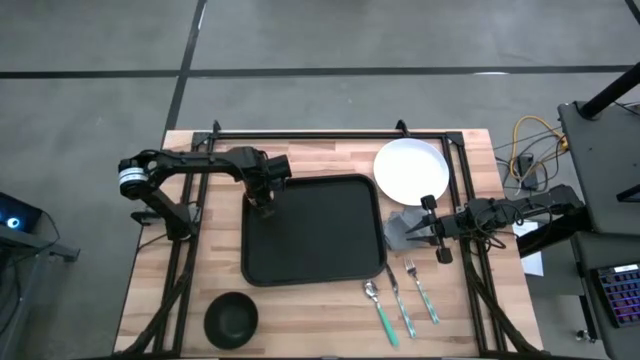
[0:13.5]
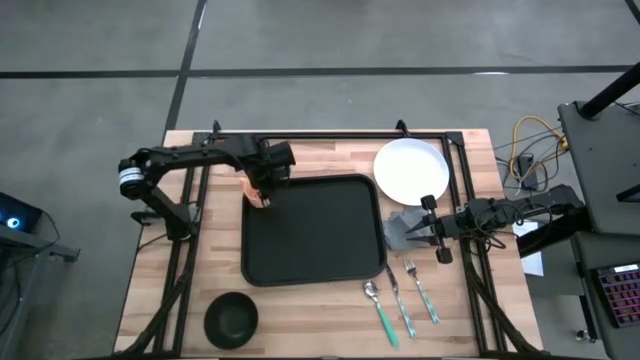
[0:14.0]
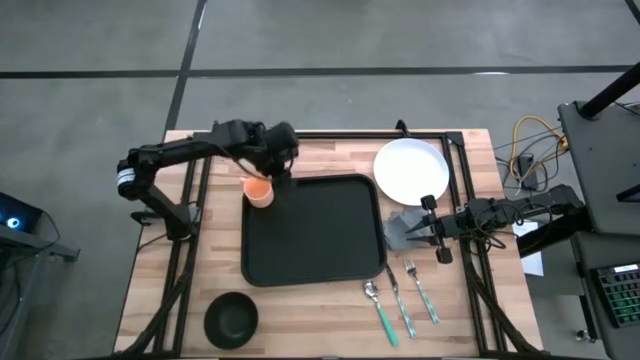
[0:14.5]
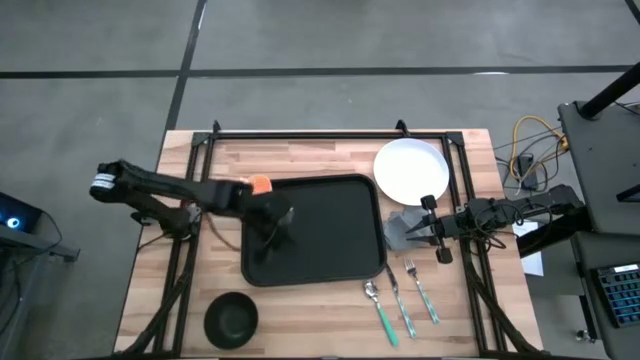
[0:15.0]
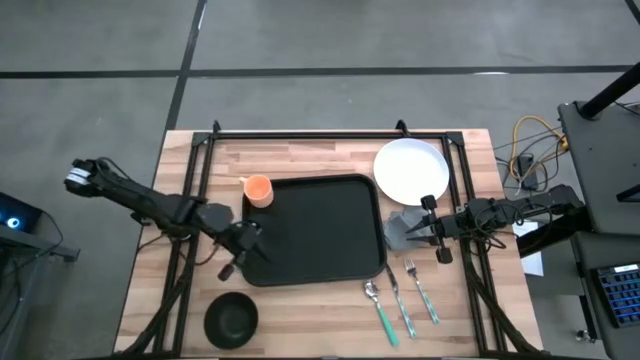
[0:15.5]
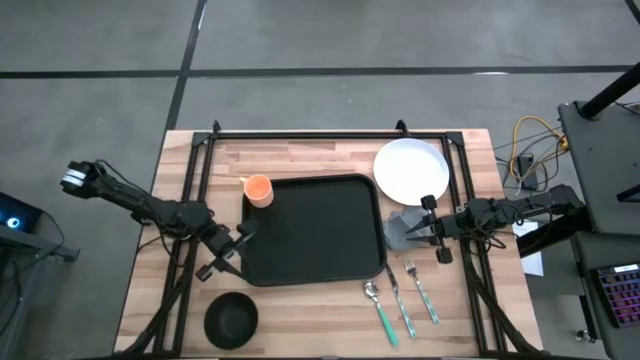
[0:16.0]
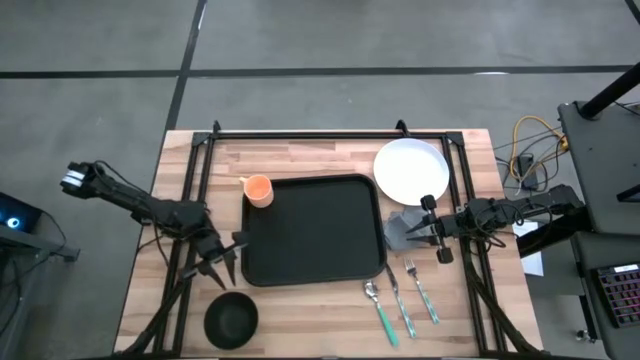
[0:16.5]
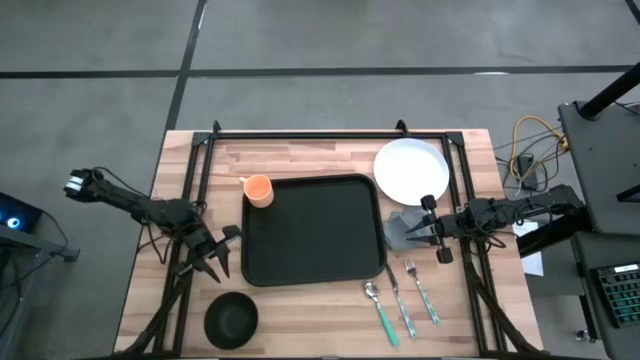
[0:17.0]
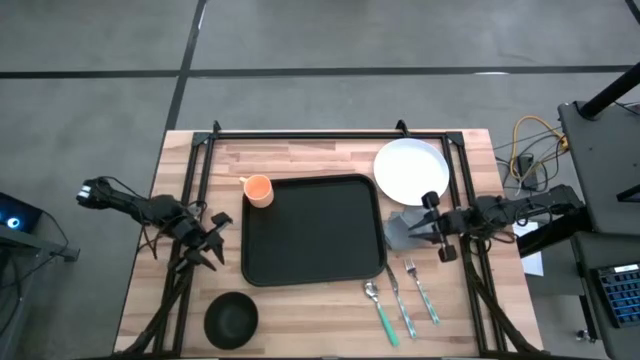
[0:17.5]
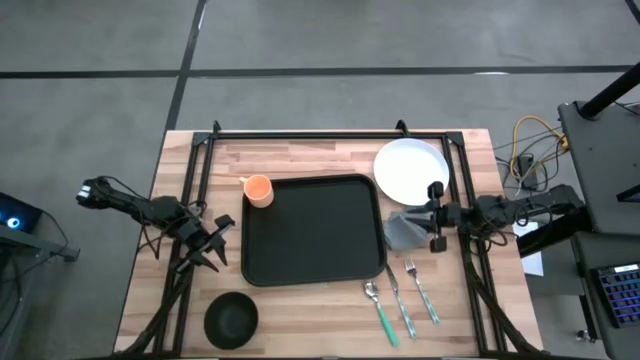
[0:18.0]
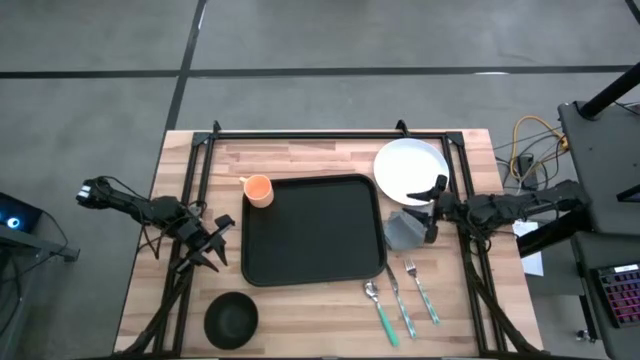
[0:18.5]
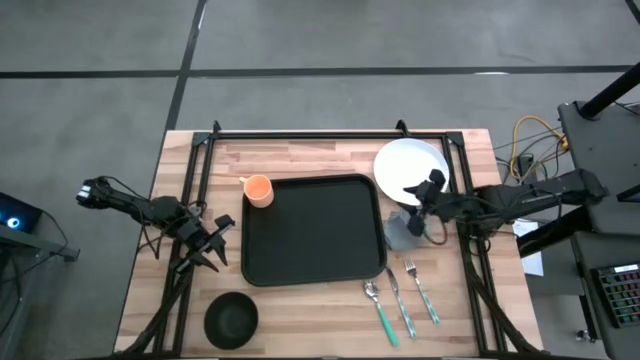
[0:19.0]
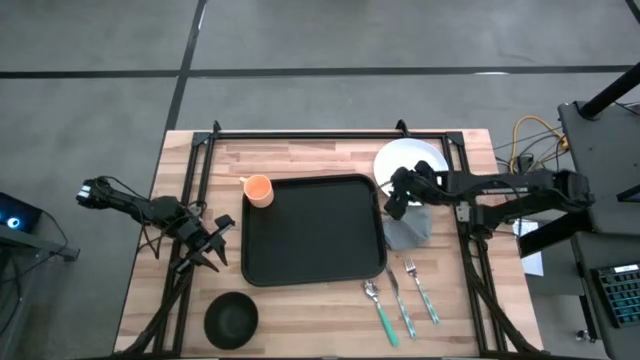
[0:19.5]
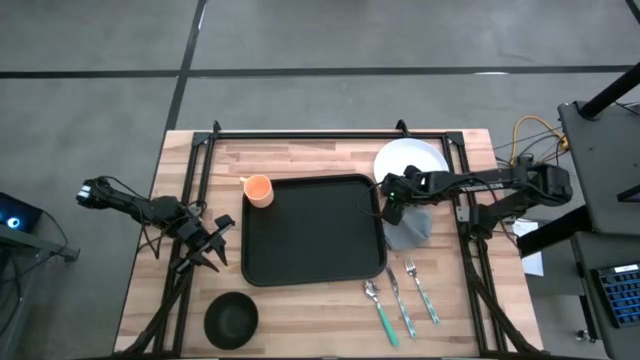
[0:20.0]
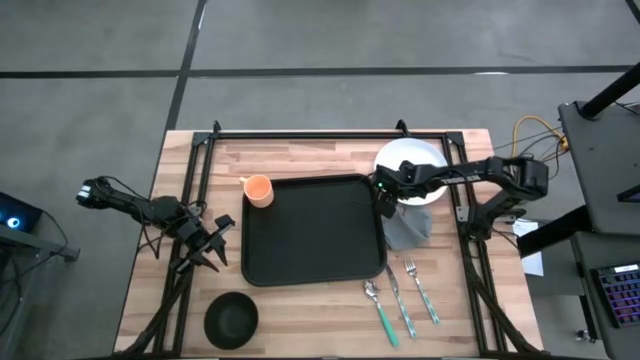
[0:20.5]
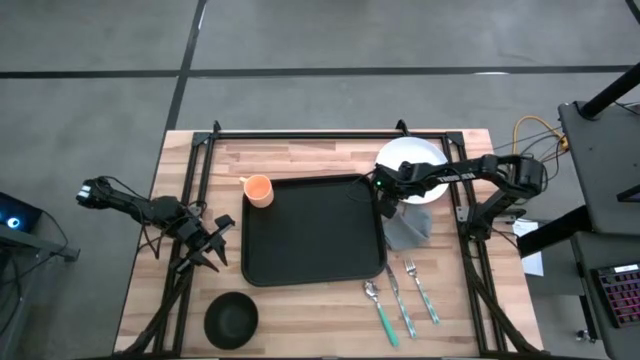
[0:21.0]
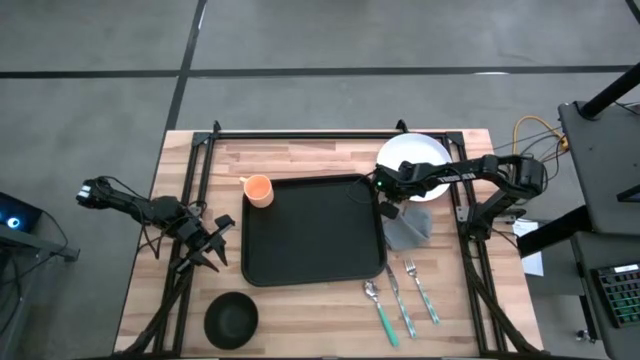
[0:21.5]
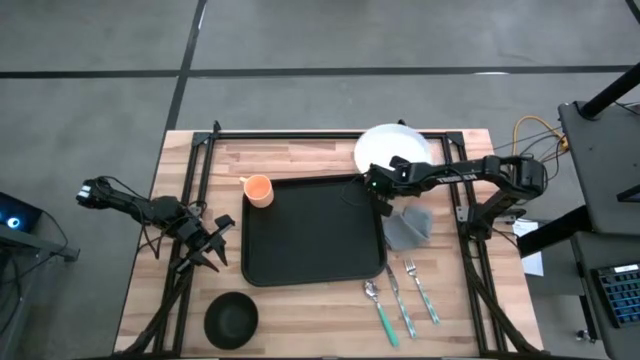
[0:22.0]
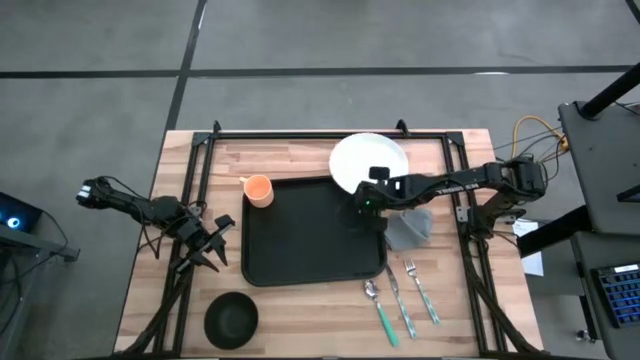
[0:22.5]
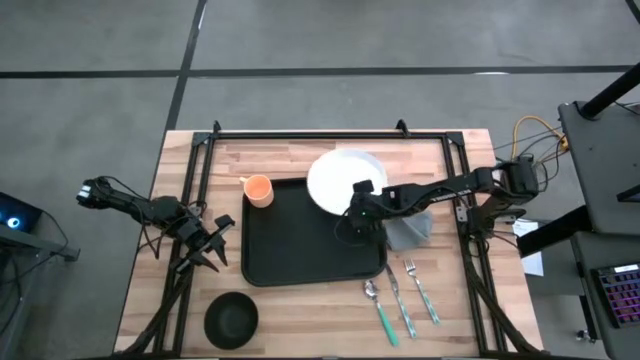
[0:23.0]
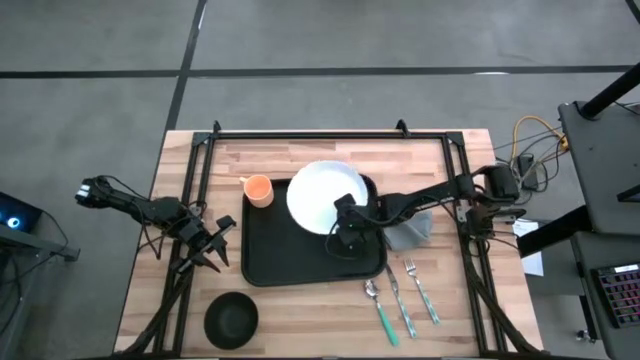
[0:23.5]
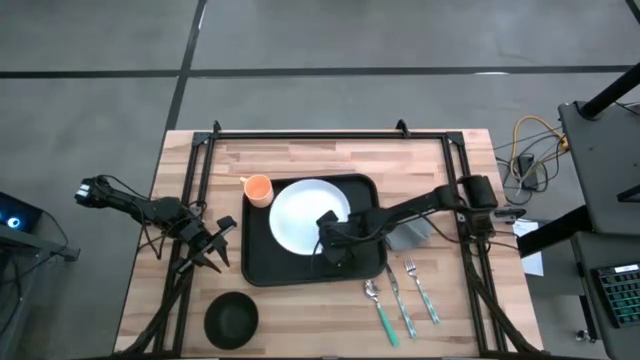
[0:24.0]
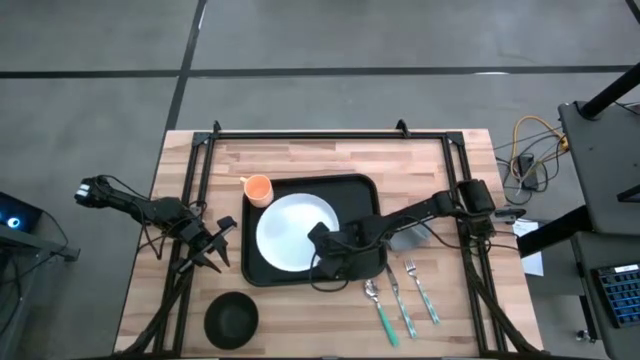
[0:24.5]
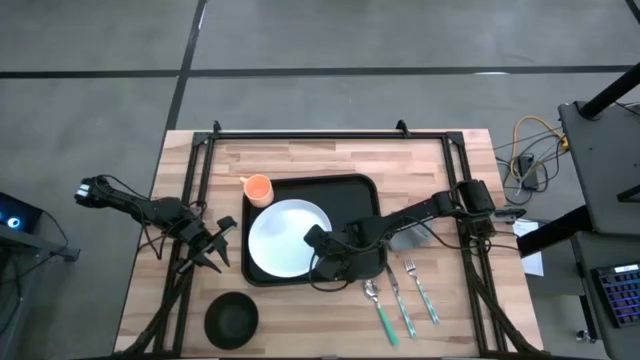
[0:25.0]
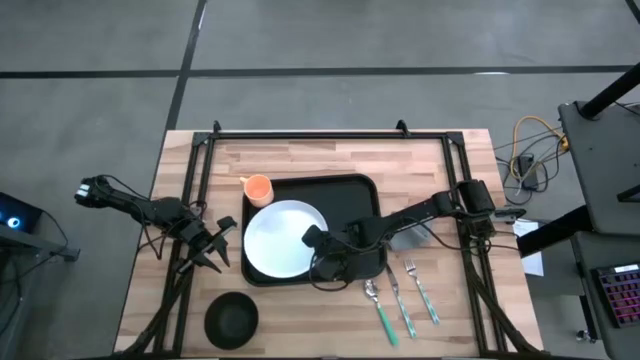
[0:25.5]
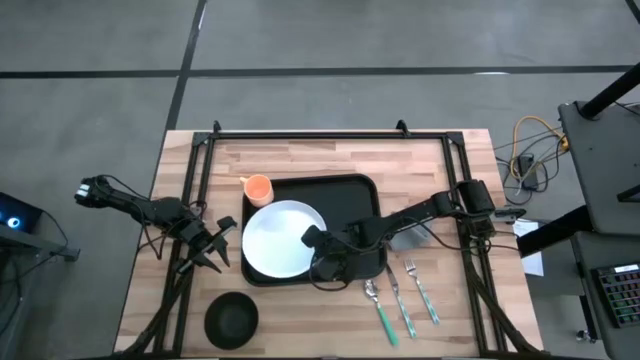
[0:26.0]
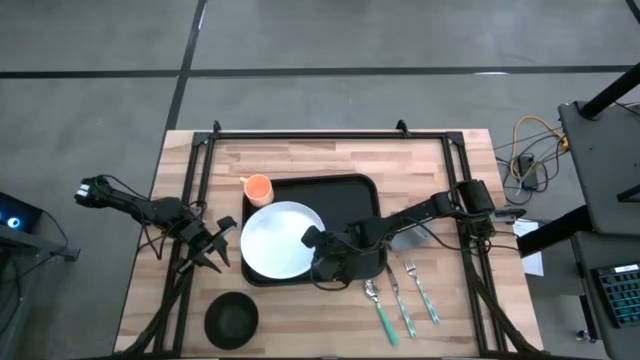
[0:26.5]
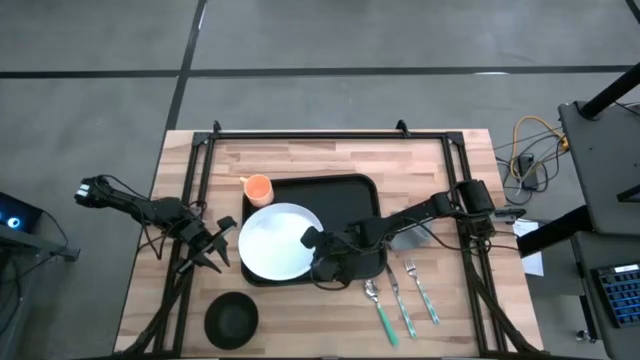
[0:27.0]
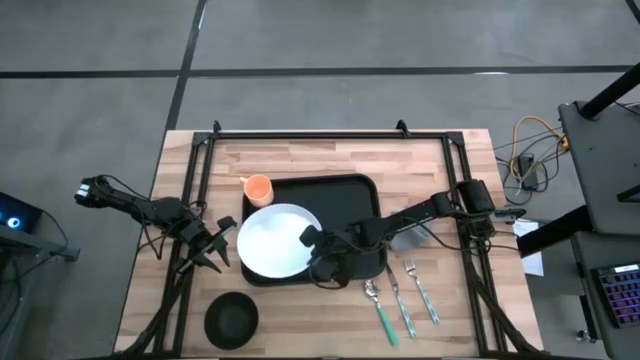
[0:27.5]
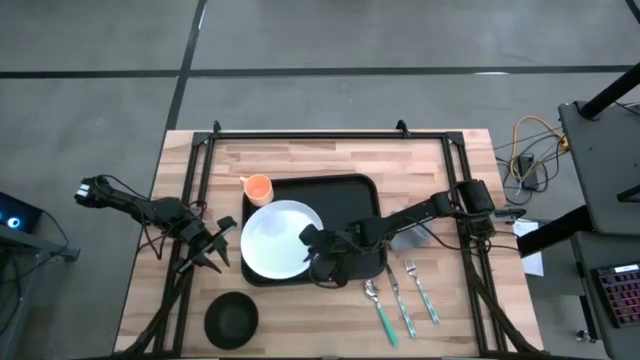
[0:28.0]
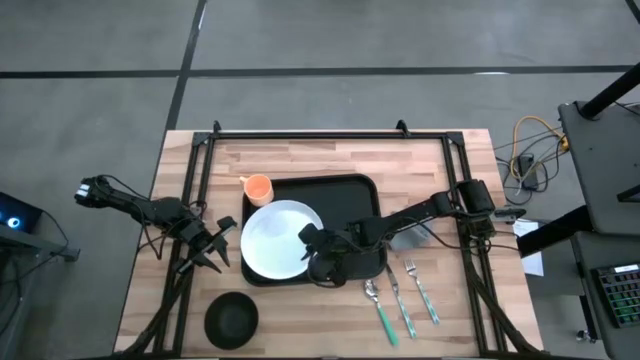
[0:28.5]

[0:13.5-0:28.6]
Task: Set up tray
Put the white plate on the black tray to the bottom right of the light orange mug

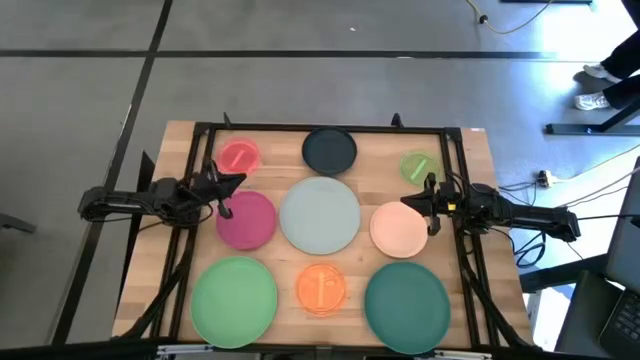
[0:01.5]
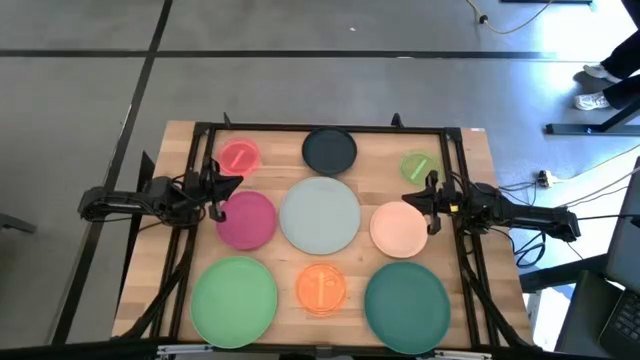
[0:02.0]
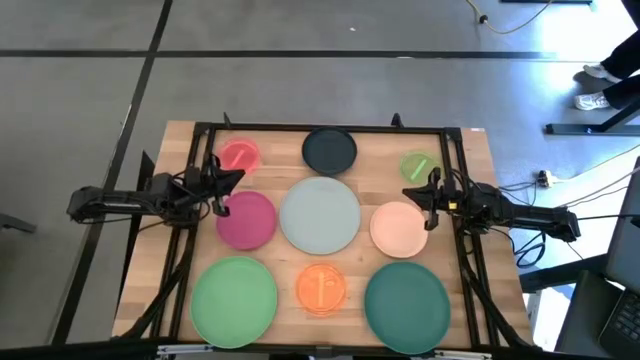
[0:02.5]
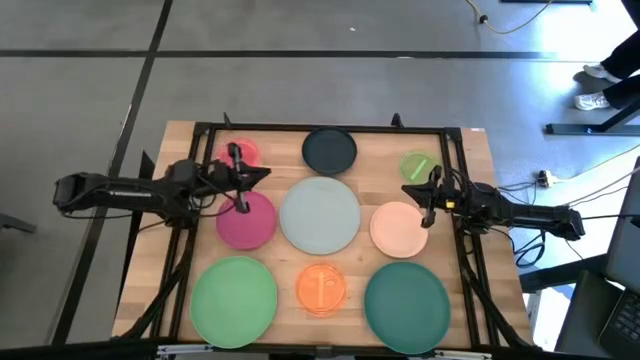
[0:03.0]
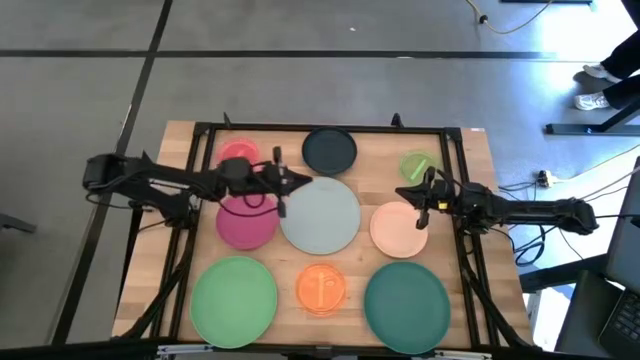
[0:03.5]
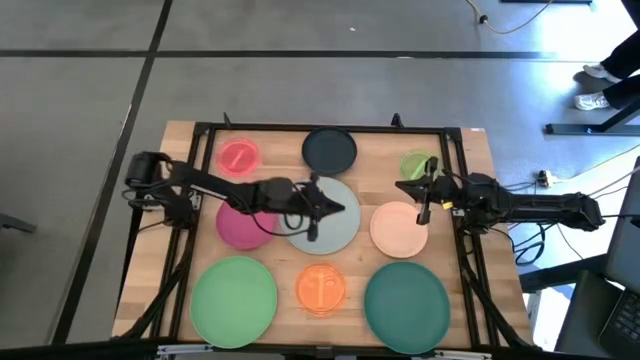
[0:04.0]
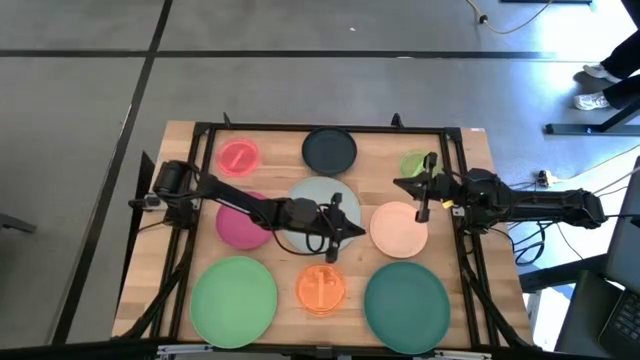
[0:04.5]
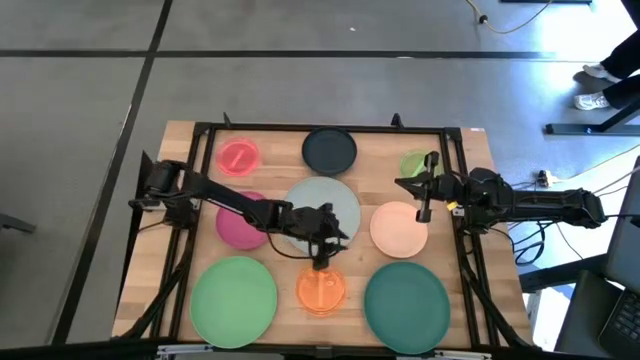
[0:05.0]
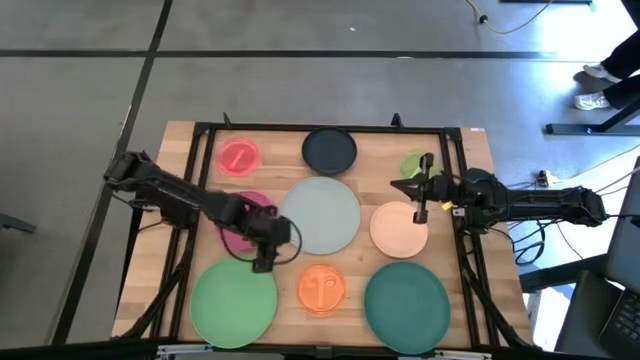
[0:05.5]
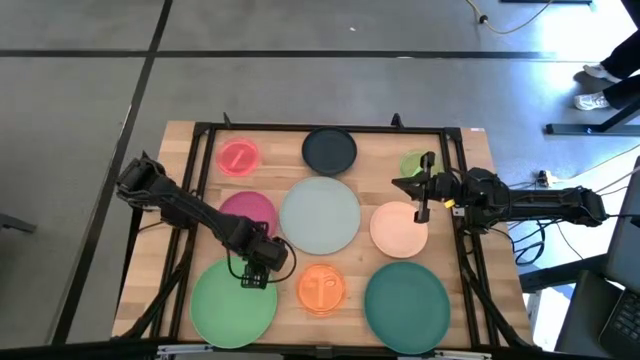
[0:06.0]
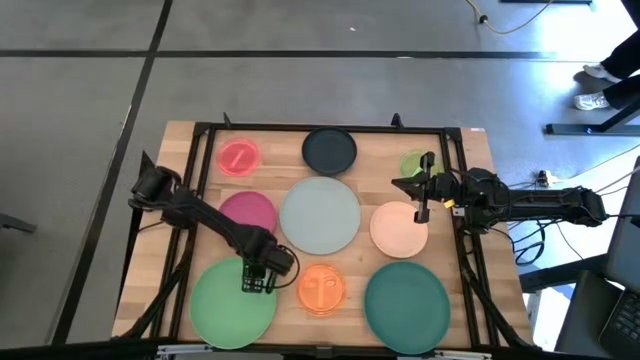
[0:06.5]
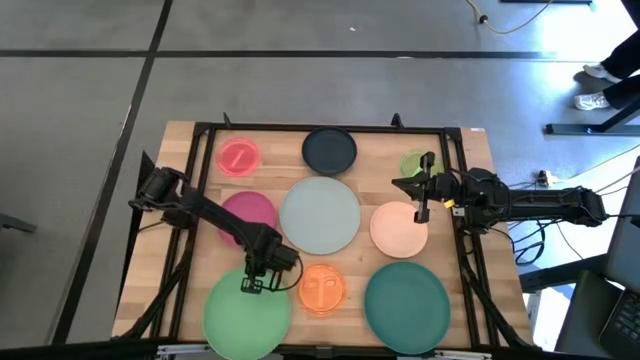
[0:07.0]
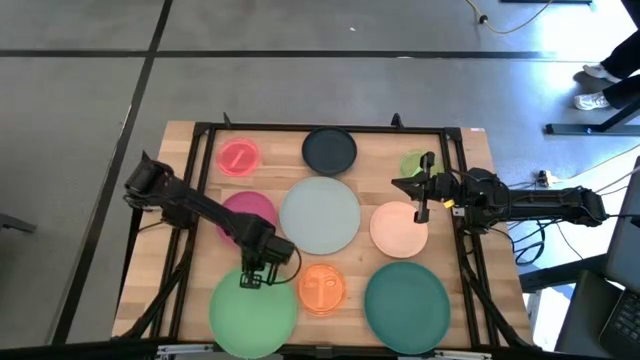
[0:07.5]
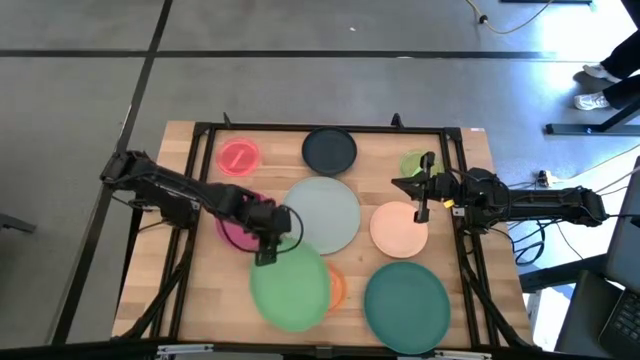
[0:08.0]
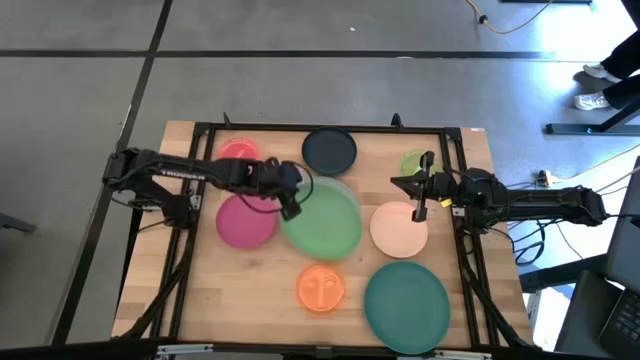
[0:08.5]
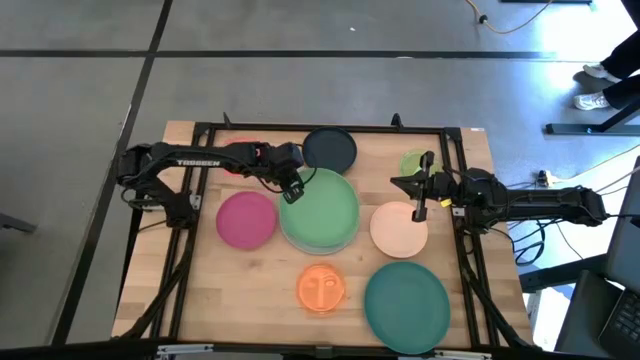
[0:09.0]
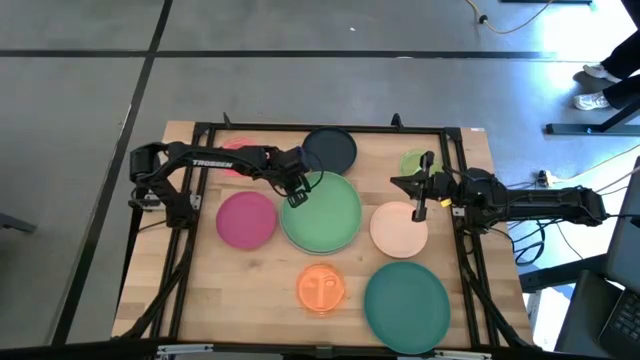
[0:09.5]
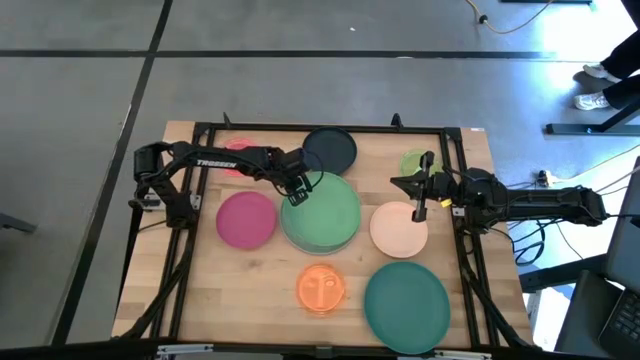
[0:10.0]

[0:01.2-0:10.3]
Task: Stack plastic plates
Stack the light green plate on the blue plate
